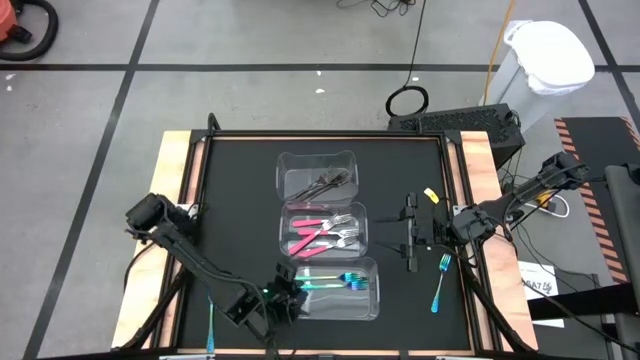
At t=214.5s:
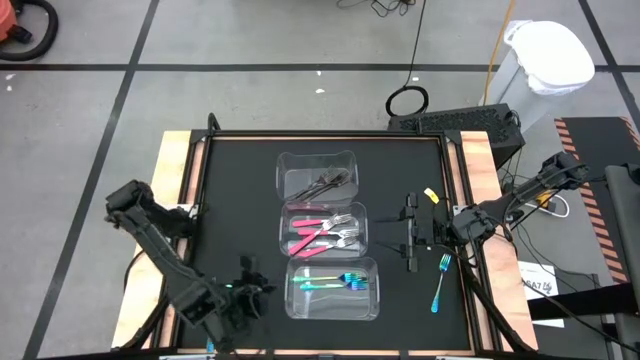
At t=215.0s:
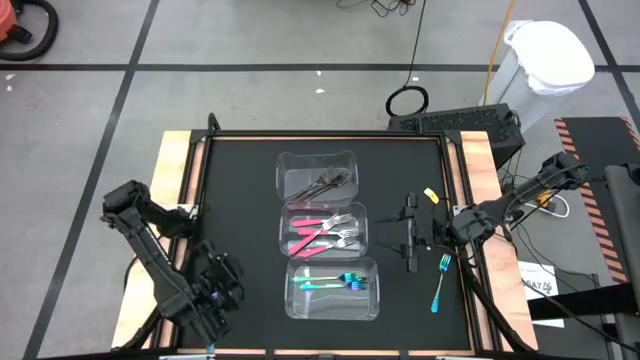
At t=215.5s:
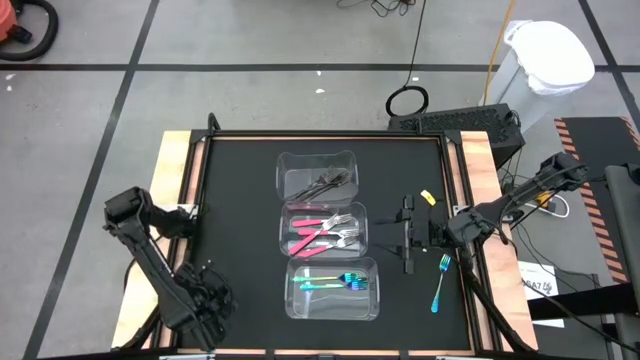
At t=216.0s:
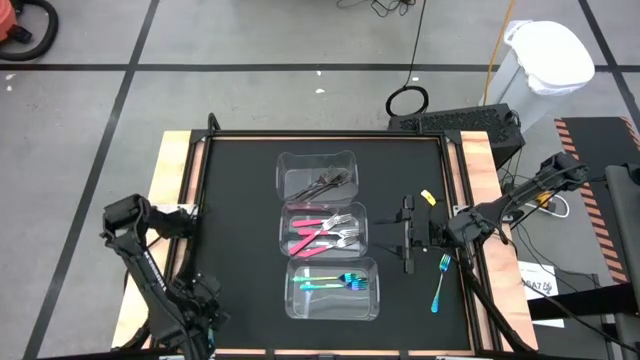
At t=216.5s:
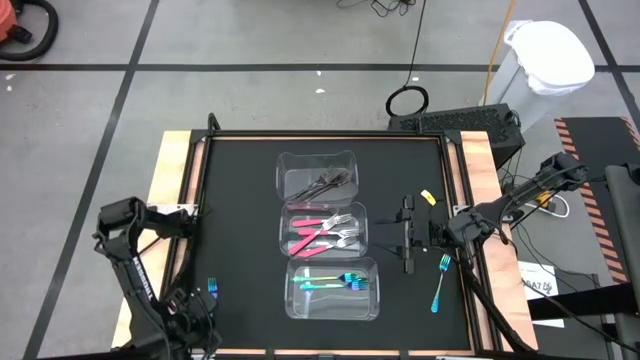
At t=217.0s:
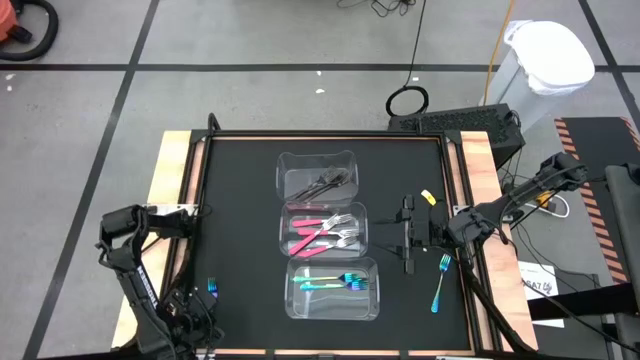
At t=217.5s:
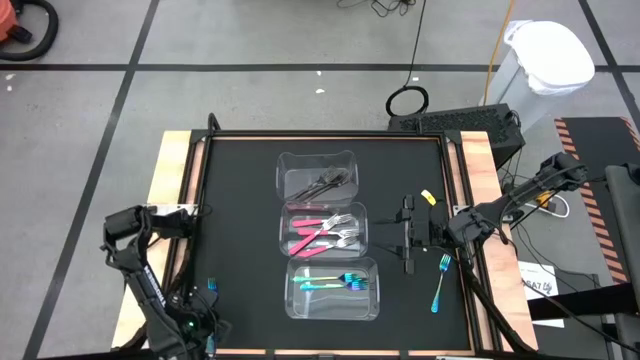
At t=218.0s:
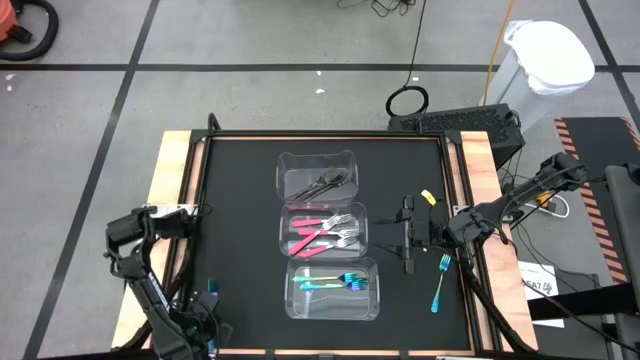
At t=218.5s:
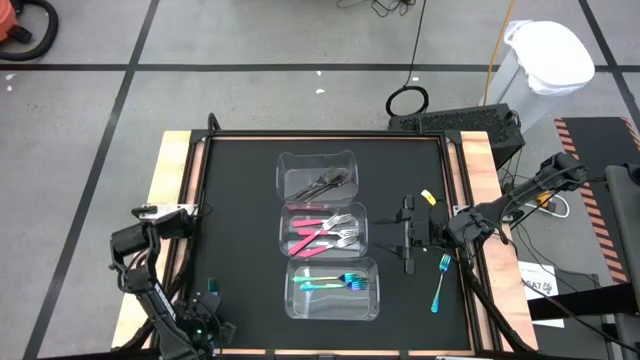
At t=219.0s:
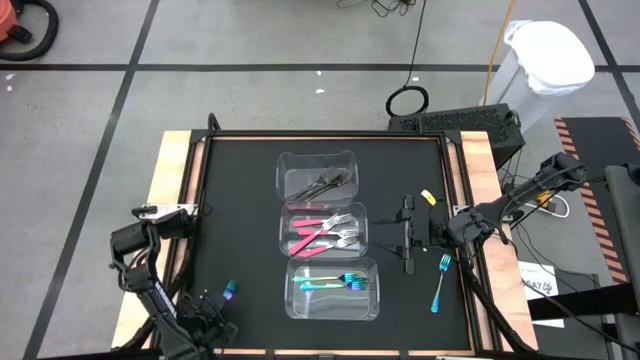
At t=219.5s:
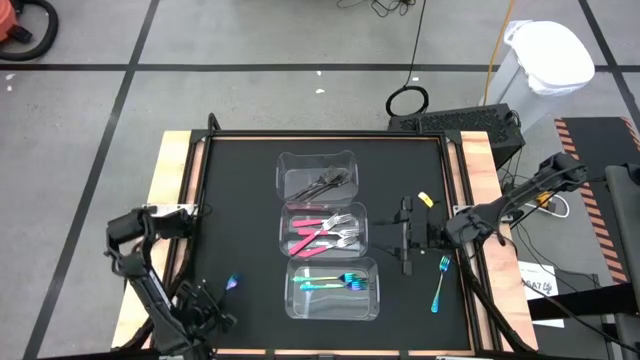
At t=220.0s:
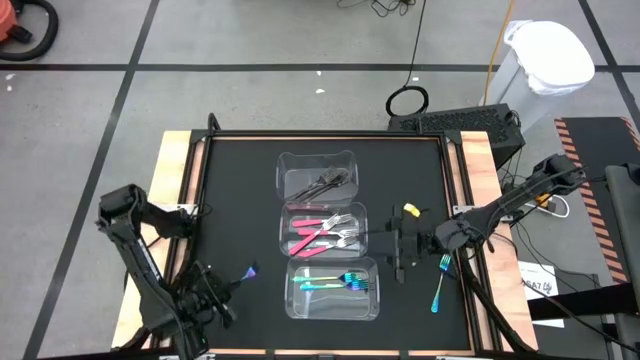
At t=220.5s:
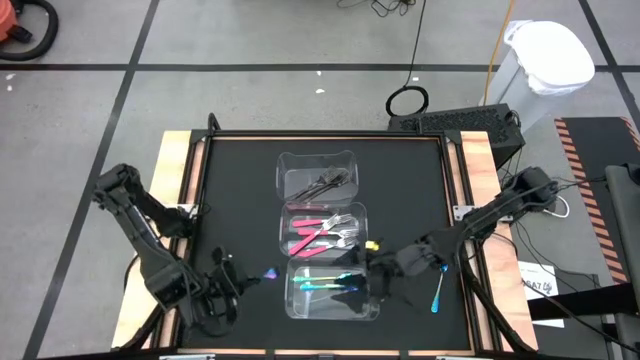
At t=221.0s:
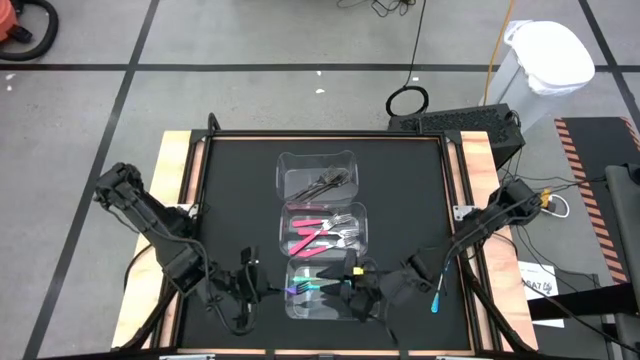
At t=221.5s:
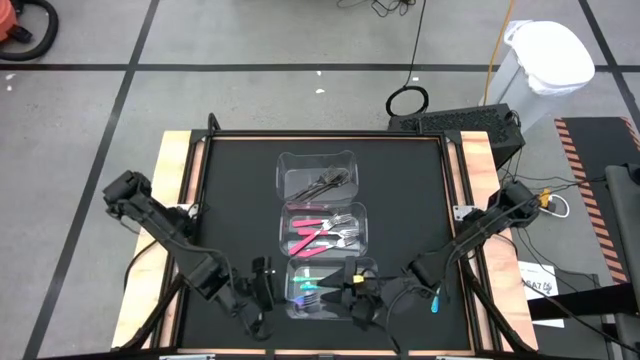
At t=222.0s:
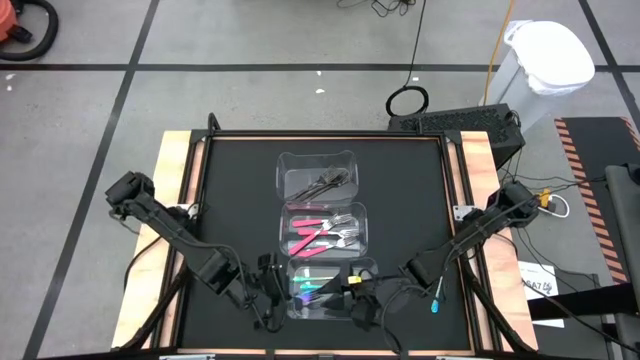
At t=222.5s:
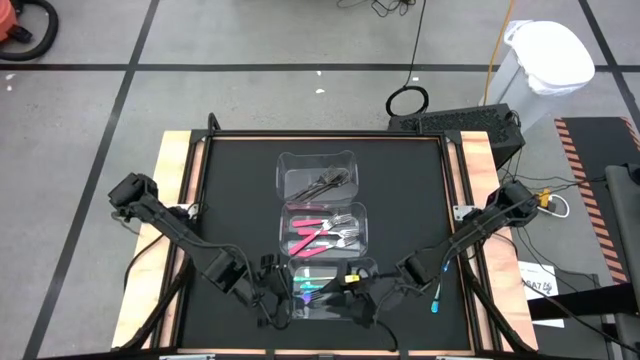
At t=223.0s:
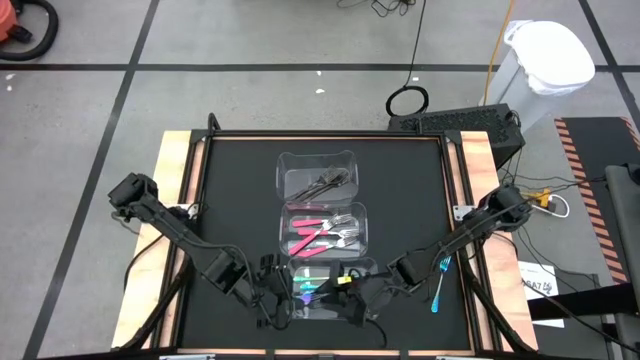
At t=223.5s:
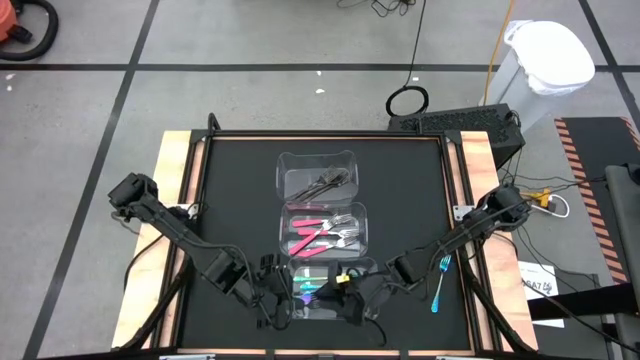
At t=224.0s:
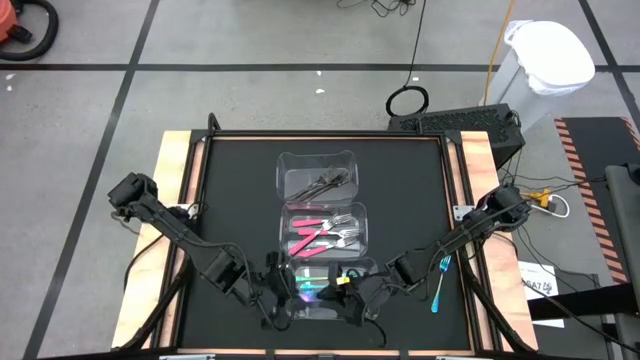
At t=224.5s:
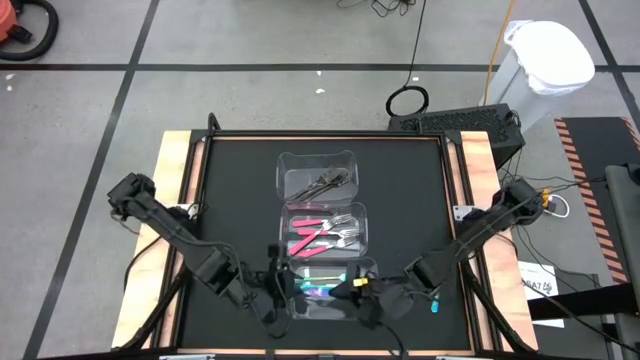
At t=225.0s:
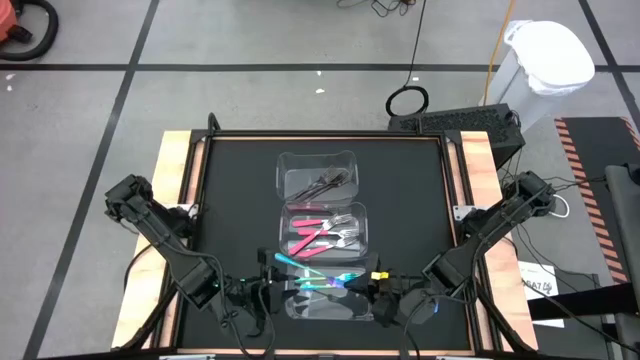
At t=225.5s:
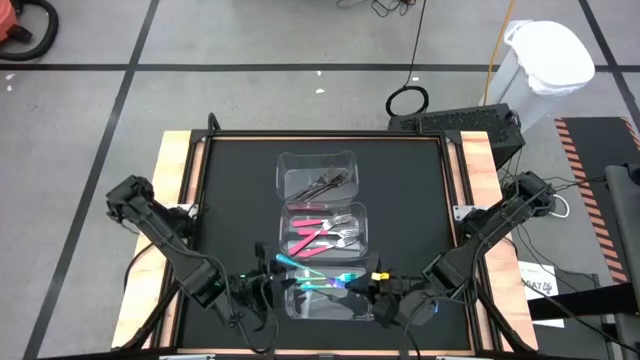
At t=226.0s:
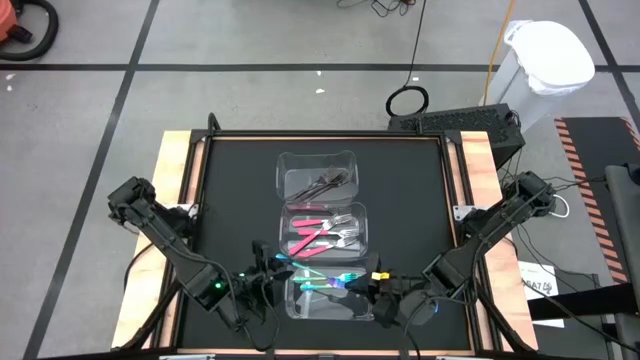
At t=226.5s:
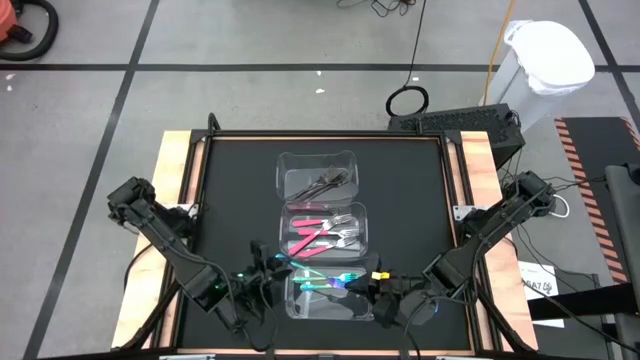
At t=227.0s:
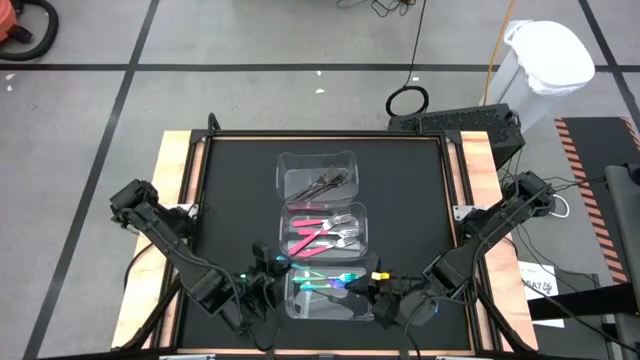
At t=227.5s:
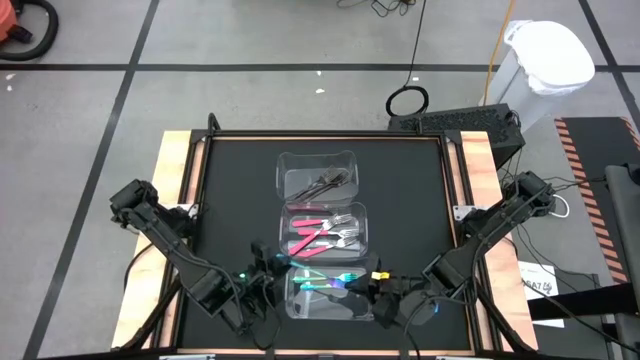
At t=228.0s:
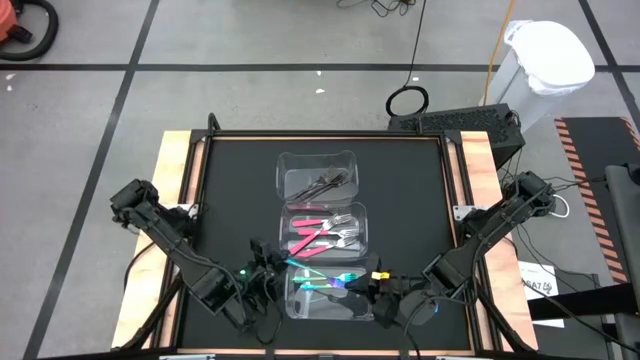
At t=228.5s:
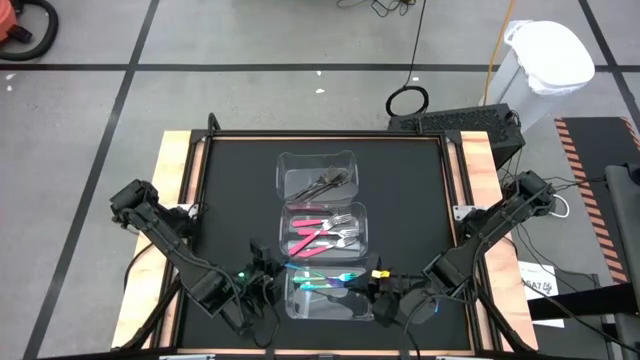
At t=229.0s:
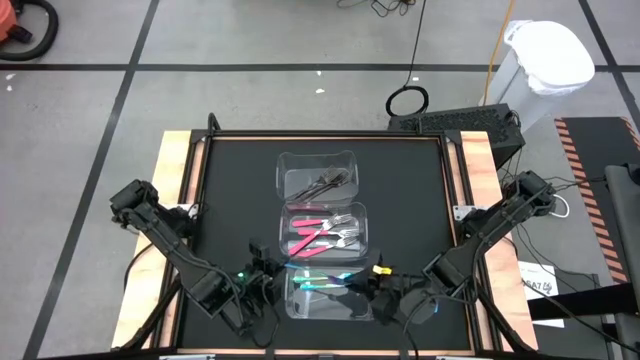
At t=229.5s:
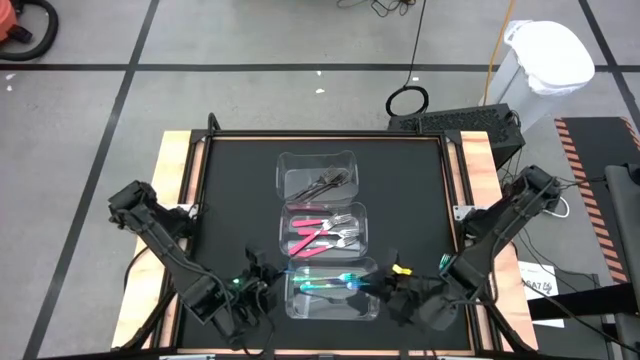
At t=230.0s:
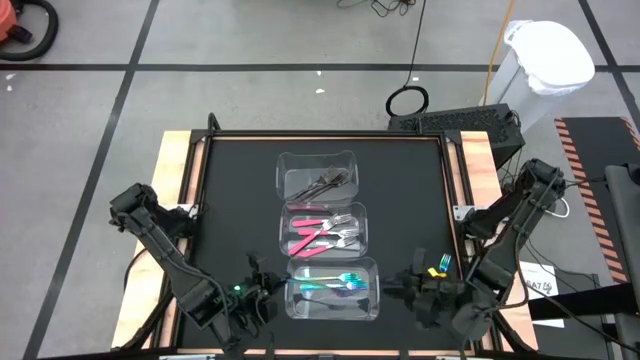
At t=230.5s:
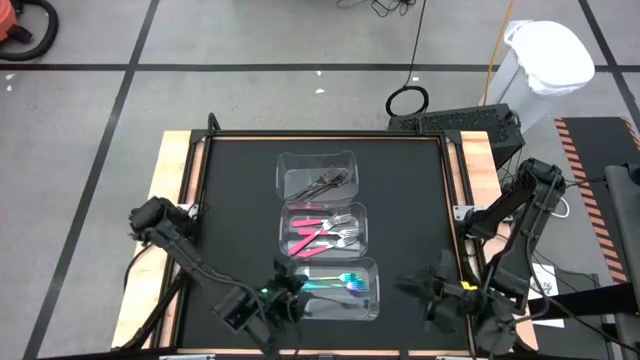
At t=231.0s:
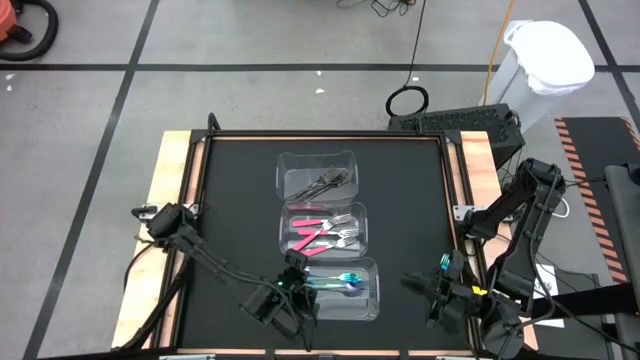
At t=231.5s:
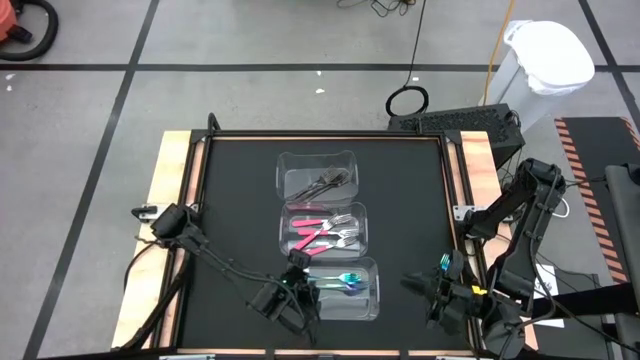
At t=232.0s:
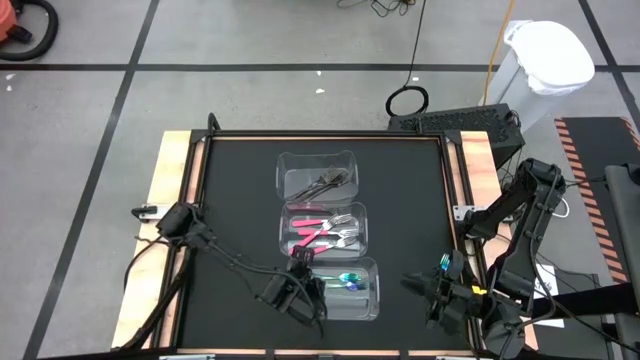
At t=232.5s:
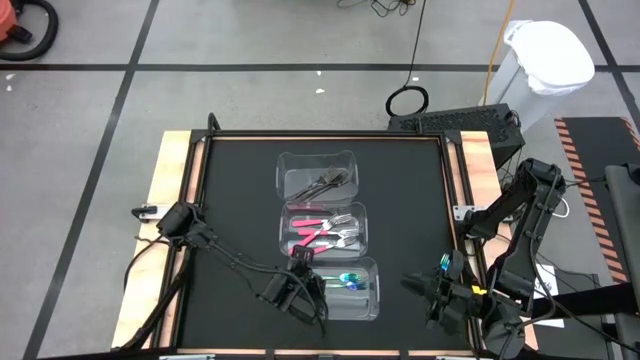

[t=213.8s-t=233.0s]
Task: Sort silverware by color (type)
Put the left blue fork into the bottom transparent bin

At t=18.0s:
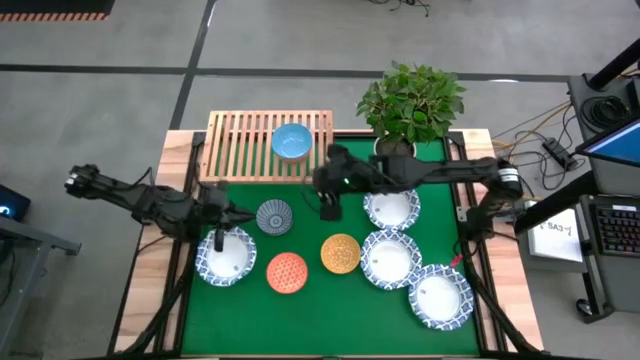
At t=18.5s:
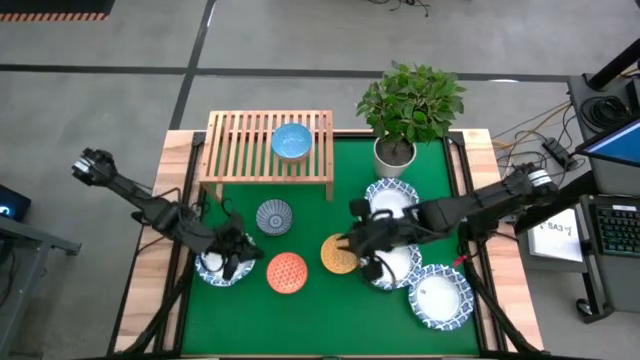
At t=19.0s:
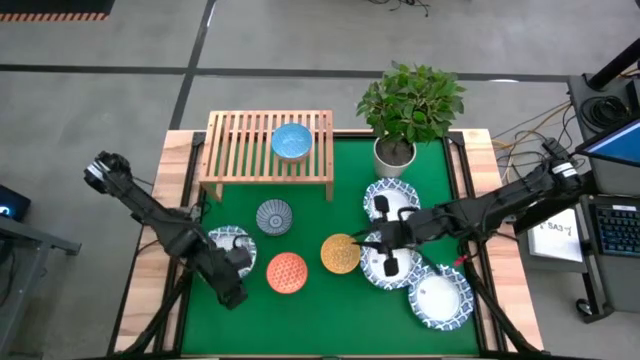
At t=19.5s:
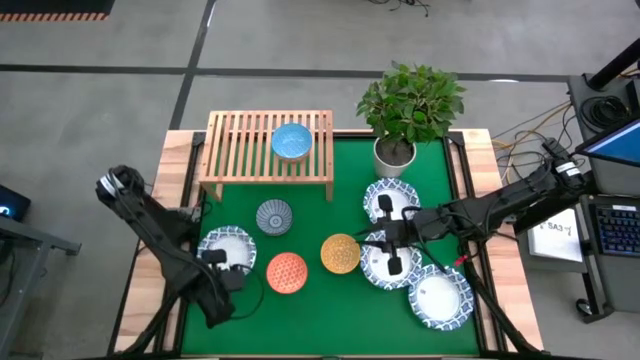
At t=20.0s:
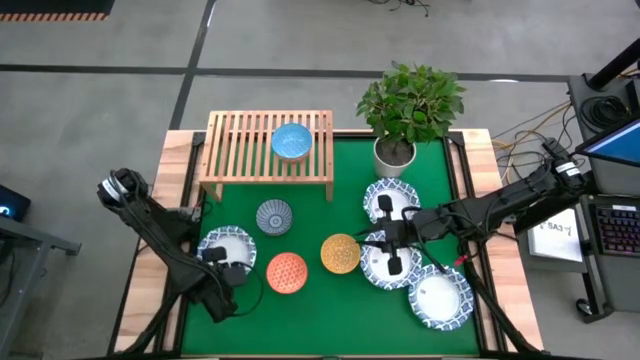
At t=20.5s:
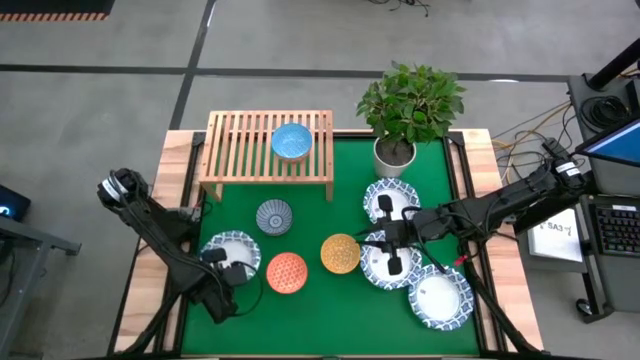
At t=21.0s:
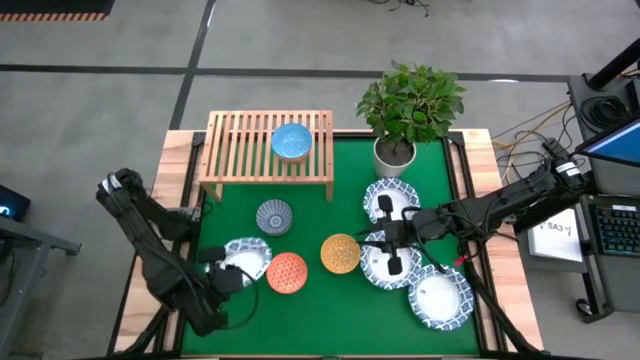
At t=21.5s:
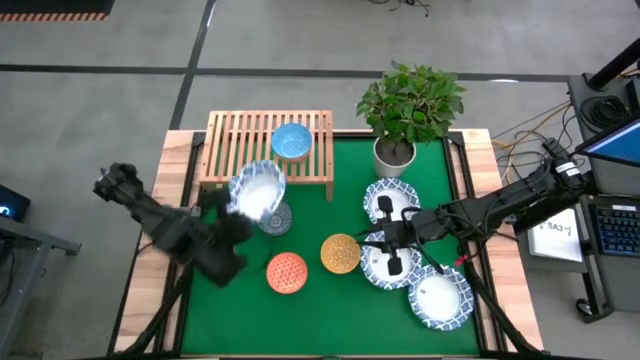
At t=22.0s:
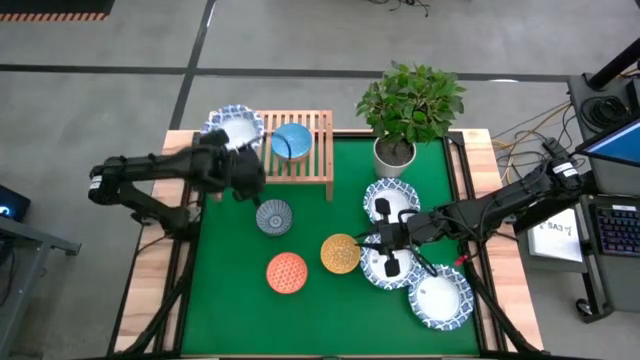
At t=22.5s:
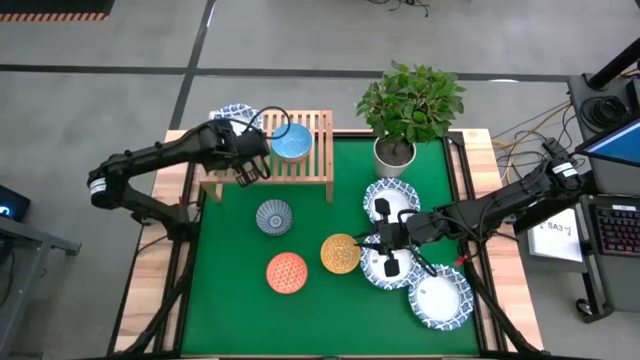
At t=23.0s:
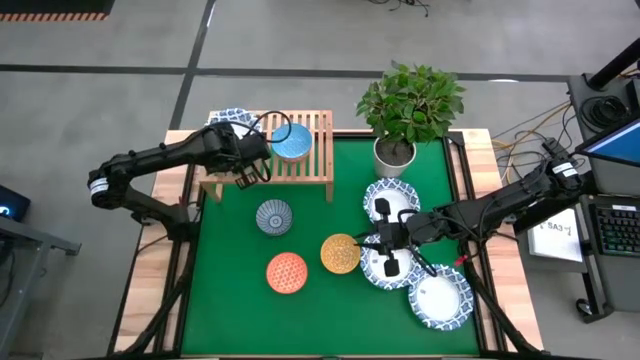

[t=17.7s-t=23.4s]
Task: Place and stack bowls onto a shelf
Put the left white bowl on the shelf
